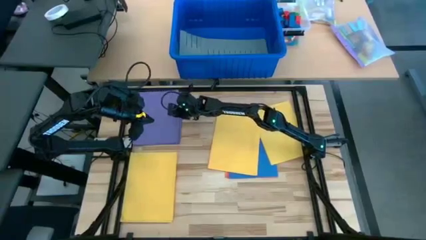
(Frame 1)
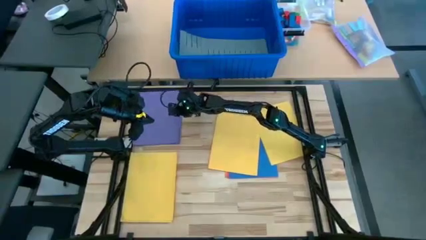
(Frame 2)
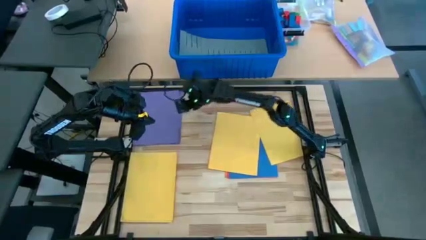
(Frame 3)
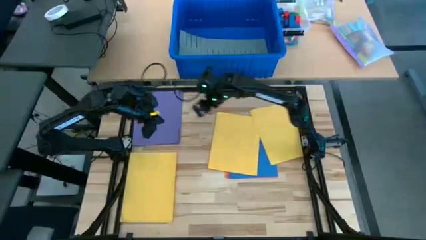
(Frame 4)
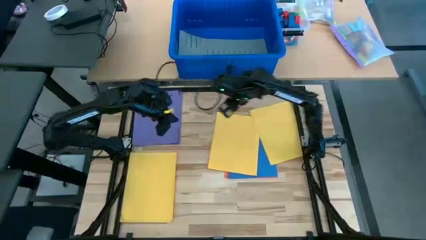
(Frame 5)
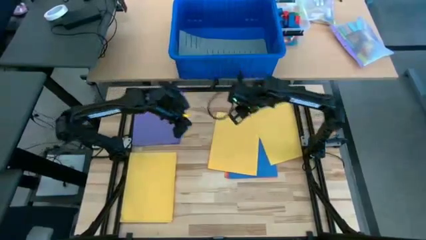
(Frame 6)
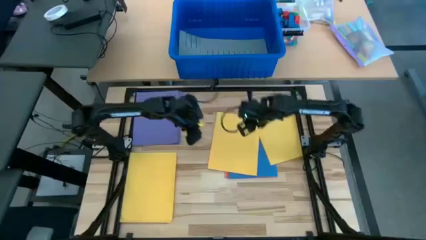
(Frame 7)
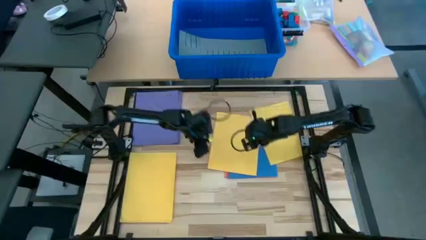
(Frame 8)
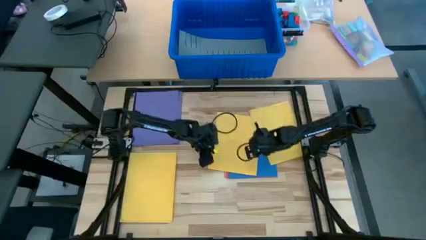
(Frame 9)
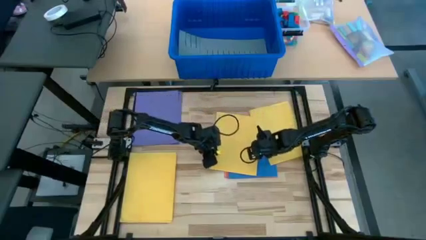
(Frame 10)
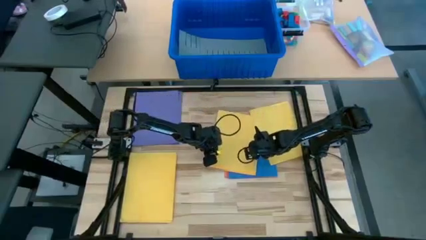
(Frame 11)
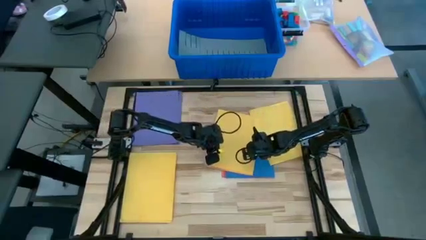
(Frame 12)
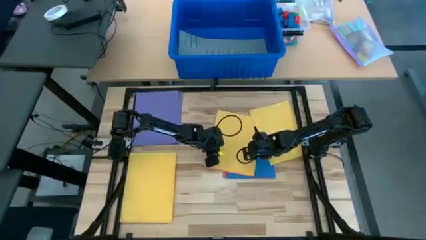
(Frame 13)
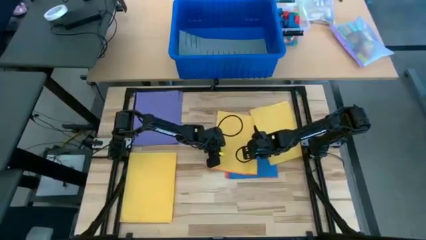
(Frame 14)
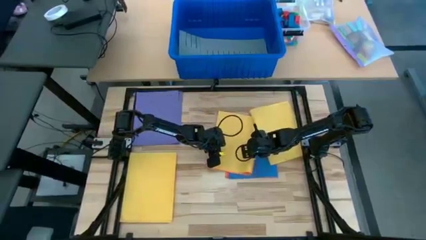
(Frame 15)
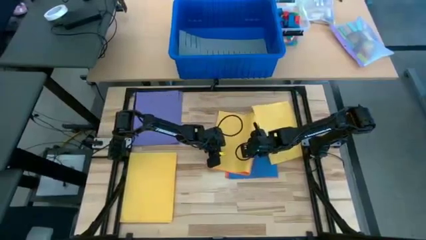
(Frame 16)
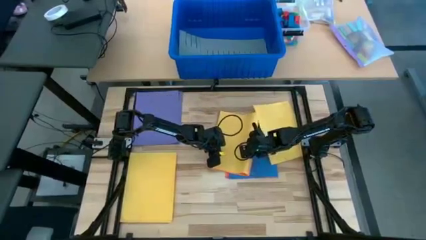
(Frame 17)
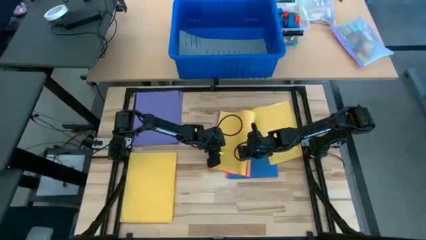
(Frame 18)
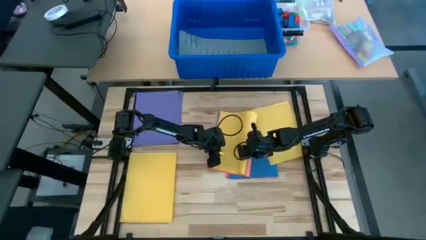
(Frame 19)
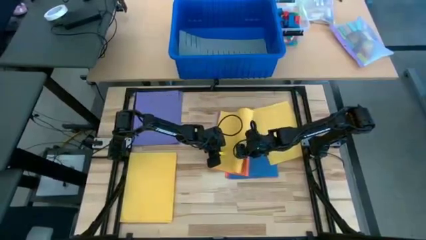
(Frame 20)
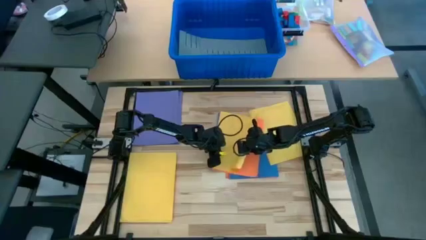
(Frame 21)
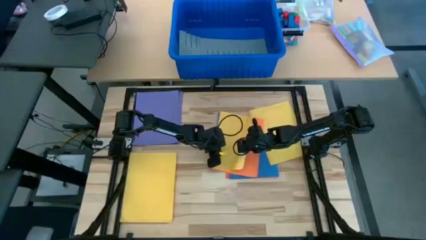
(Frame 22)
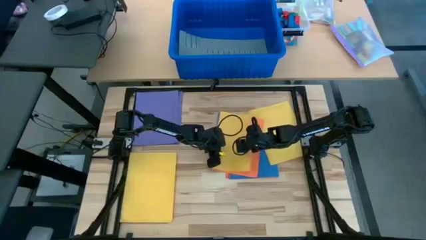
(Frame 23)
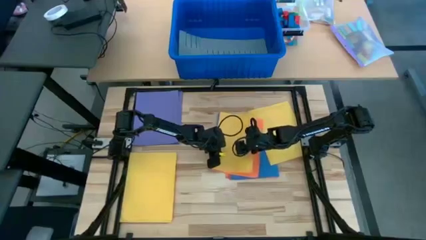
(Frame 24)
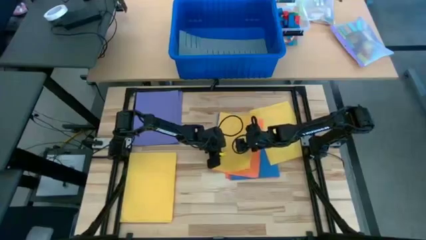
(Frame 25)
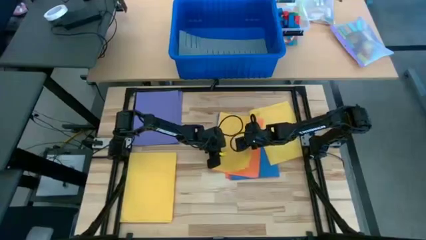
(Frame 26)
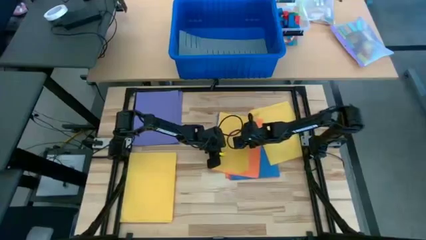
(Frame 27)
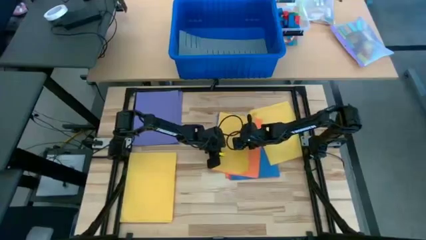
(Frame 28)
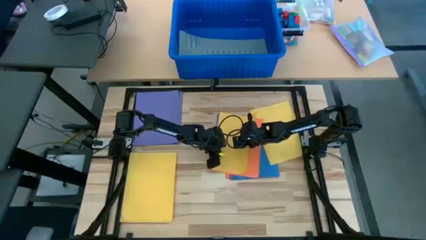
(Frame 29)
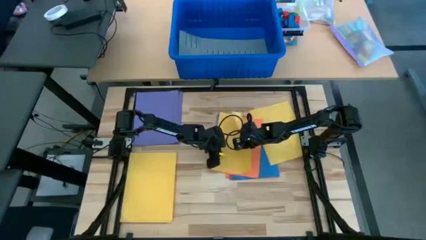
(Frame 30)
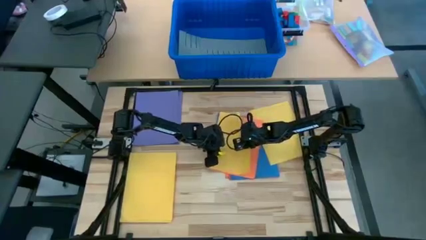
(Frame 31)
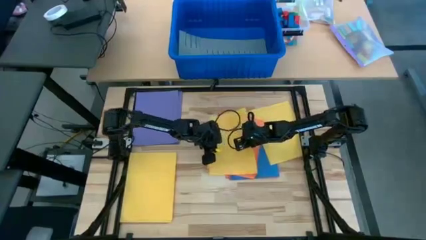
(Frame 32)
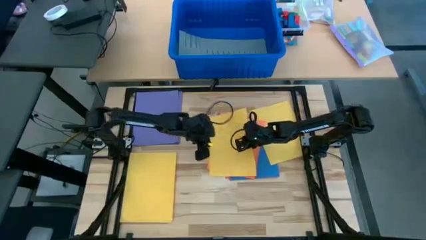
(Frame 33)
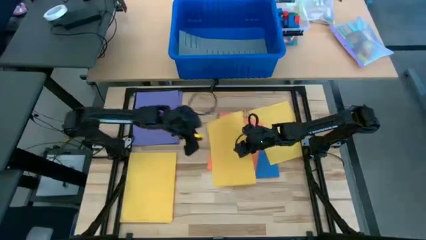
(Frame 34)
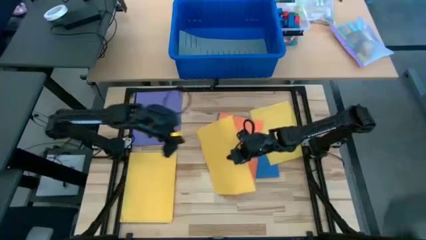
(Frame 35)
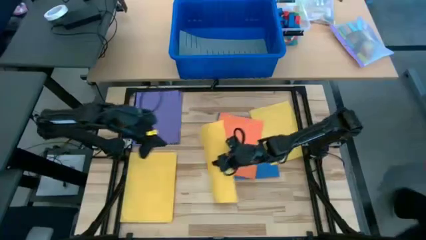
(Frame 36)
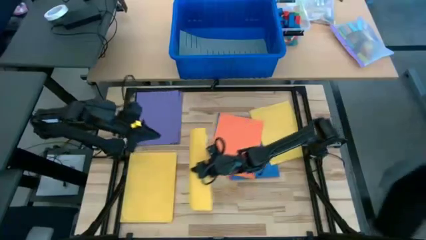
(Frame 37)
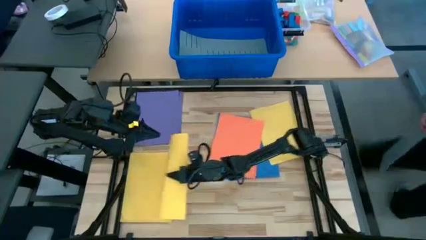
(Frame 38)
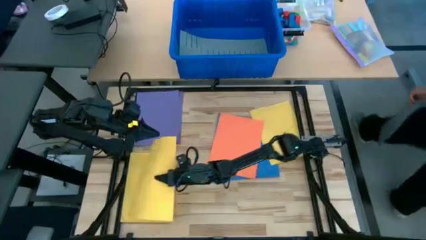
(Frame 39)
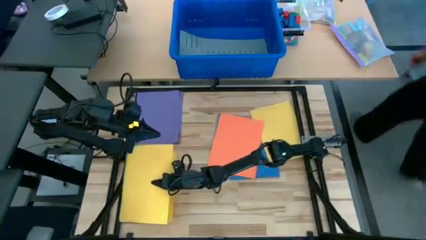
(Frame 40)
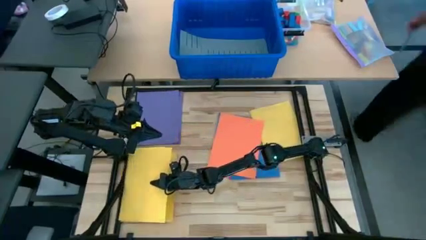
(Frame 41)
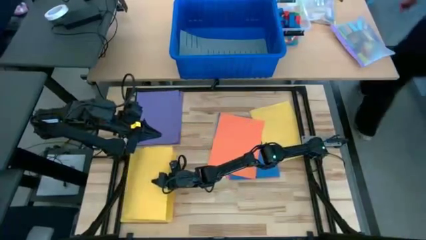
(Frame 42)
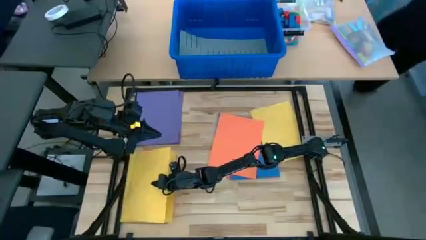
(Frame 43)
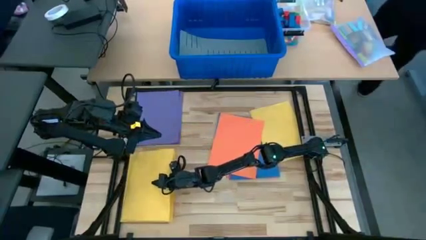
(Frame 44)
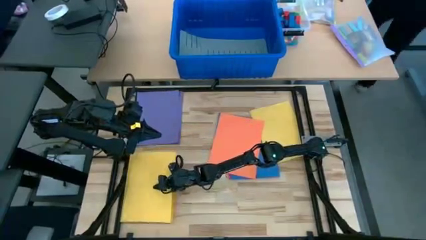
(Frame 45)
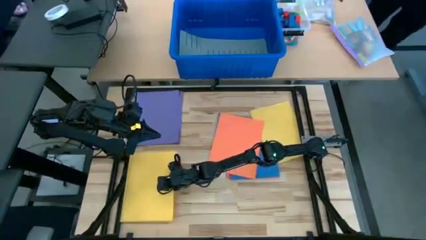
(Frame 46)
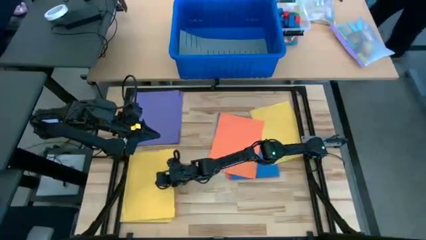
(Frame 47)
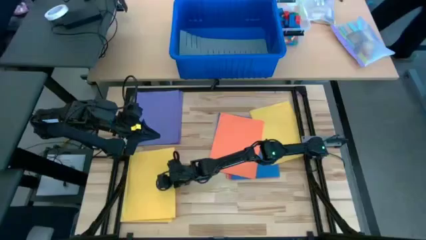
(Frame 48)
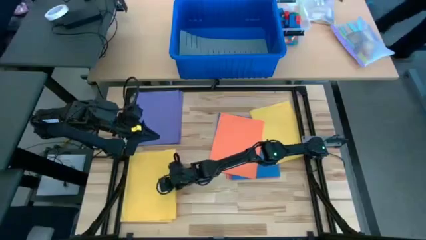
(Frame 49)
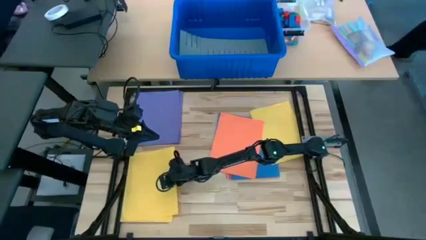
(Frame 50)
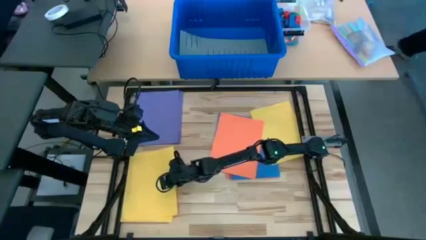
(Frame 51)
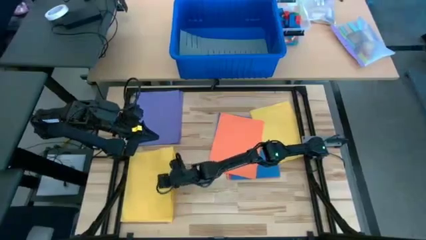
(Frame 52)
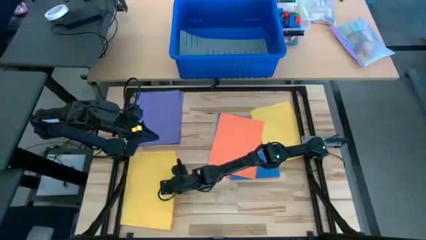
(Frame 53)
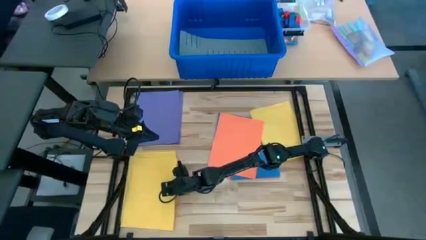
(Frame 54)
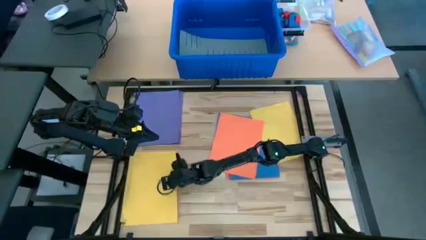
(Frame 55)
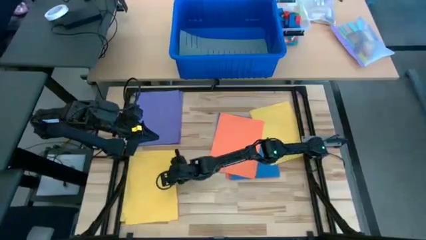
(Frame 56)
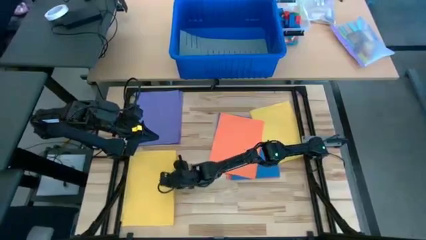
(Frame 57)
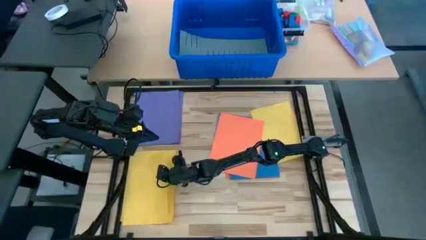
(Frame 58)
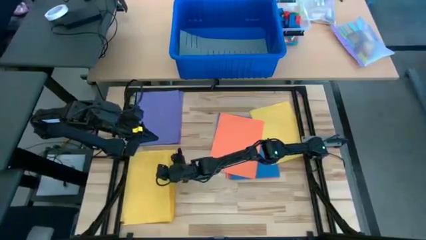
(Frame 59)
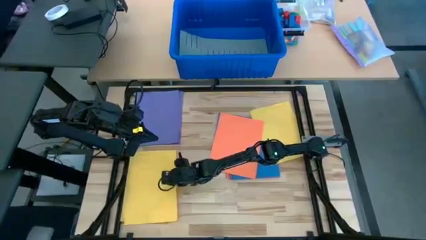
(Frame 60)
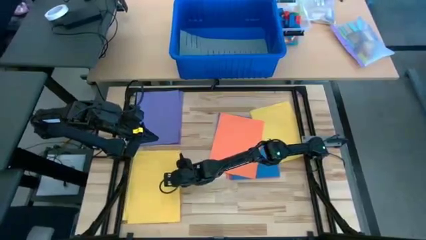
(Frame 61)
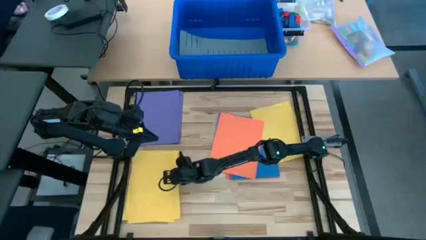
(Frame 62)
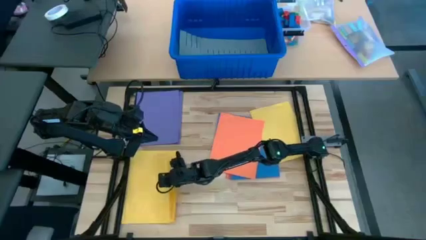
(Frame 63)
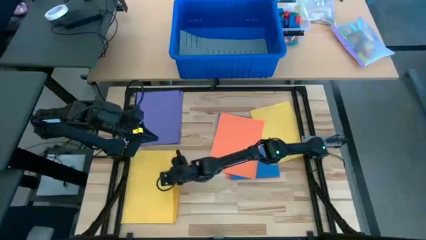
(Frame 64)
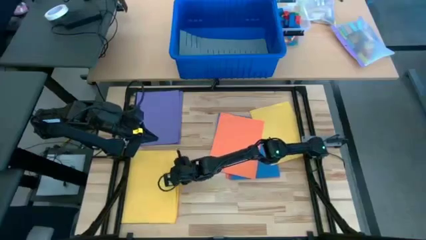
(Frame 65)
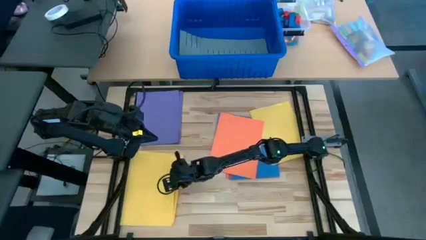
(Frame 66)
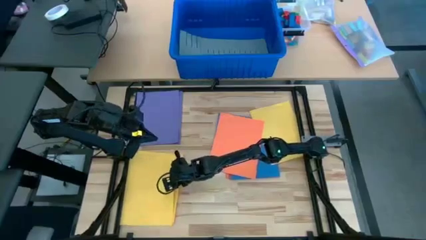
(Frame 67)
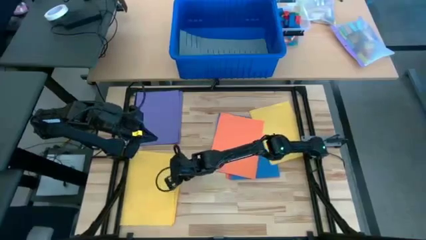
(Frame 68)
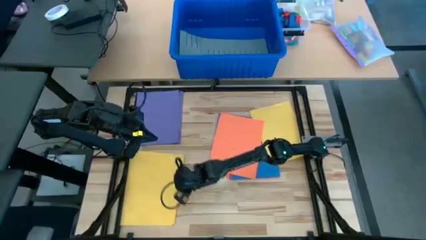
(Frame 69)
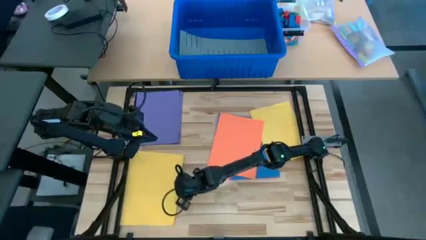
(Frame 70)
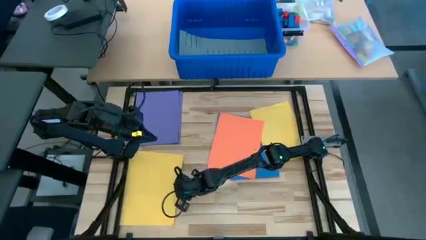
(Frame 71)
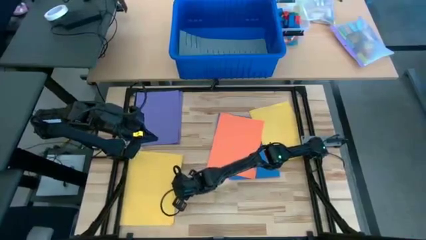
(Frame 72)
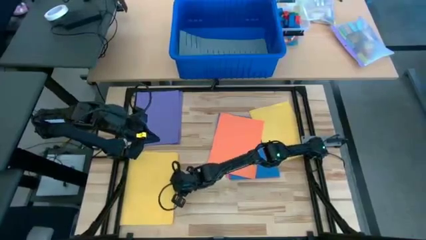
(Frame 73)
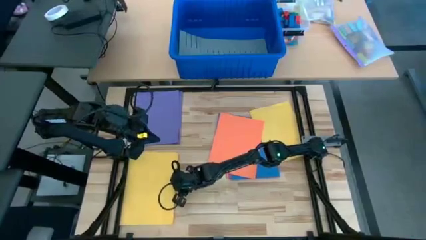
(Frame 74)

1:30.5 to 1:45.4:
Task: Organize paper
Stack the yellow colored paper on top of the other yellow colored papers

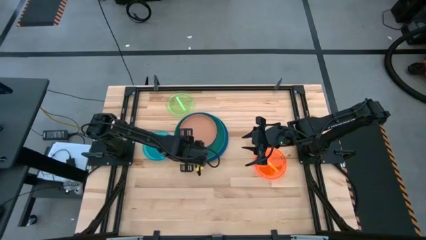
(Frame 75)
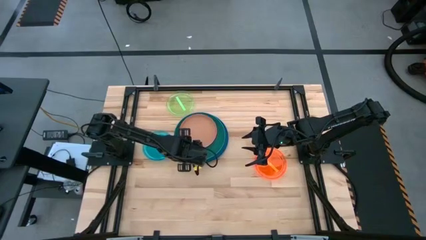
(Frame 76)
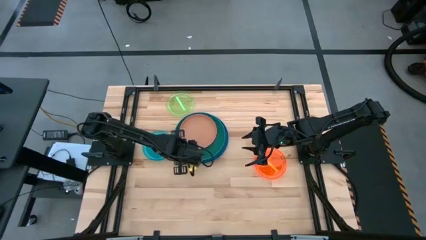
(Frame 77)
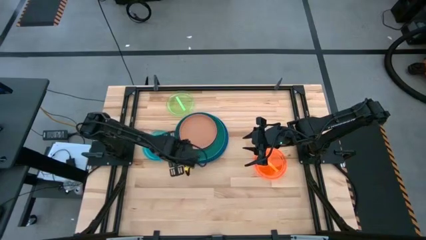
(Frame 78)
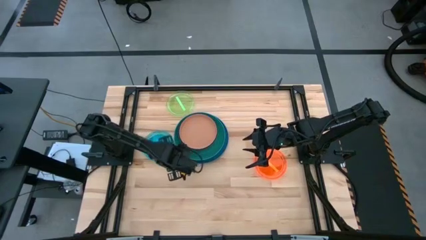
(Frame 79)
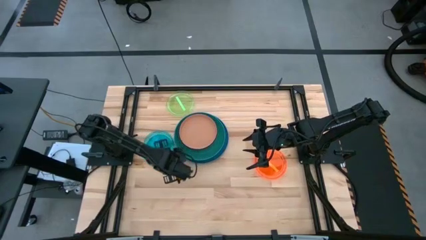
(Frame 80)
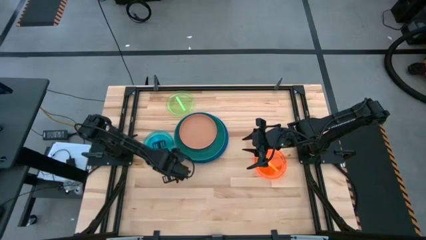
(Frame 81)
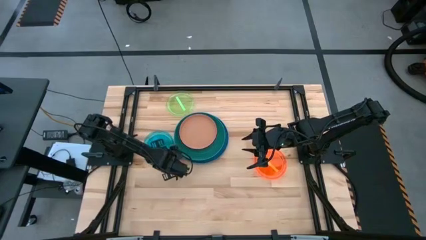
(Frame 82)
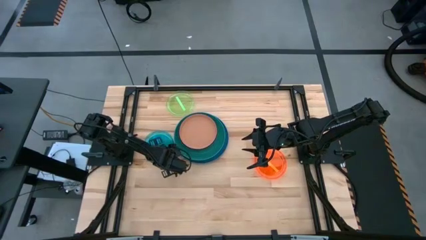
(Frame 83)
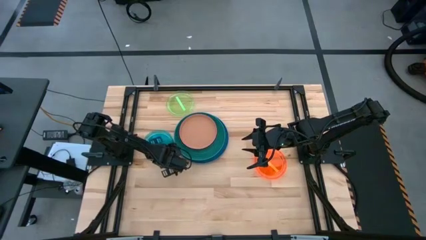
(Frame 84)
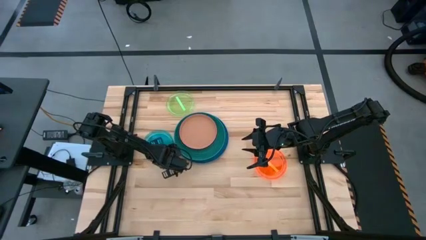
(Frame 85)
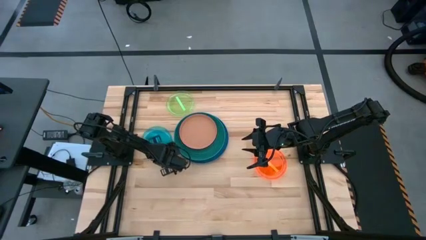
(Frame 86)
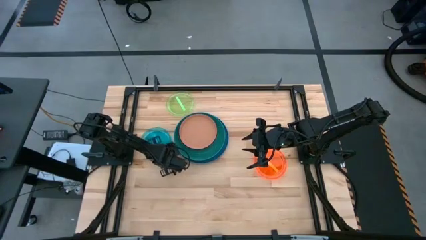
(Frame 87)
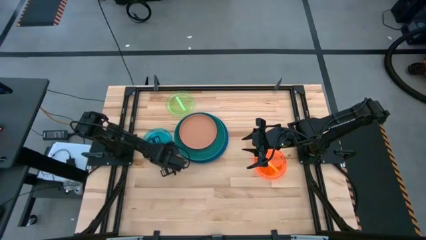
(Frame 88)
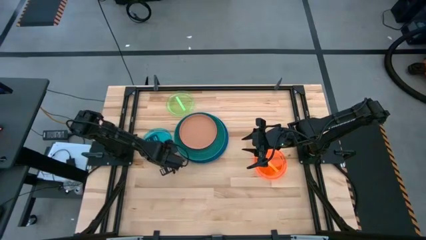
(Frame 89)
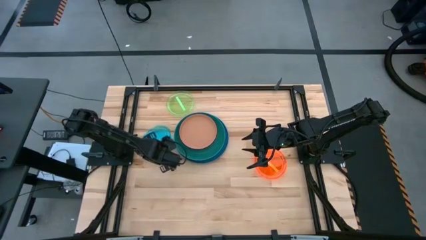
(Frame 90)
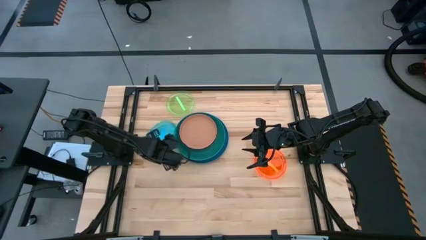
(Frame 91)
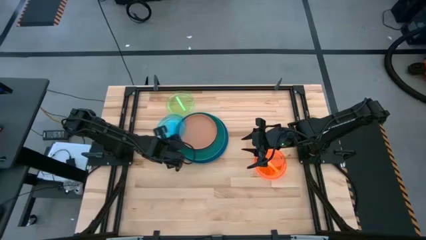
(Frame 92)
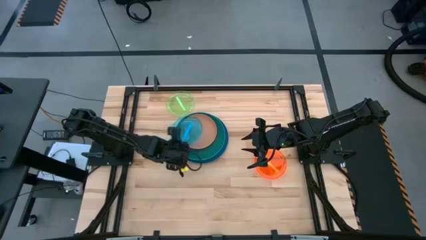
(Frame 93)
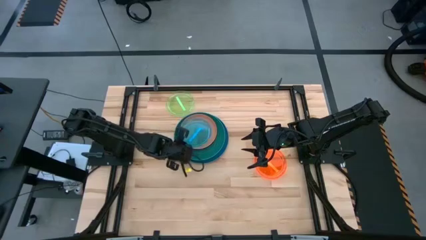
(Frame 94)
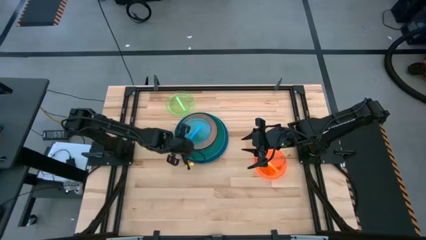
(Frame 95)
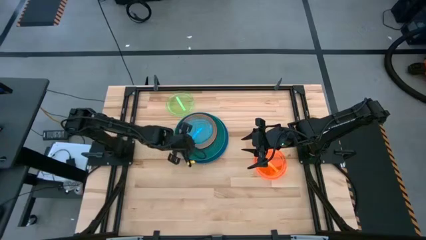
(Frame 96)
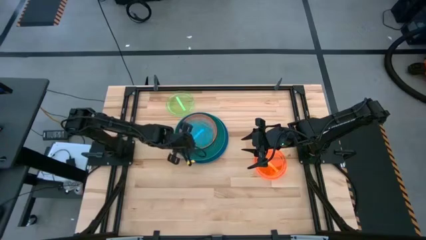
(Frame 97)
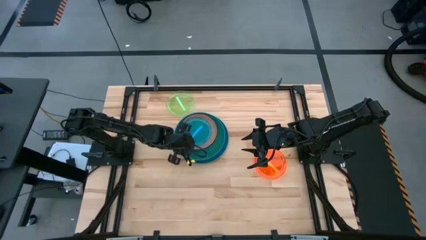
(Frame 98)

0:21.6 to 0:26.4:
Task: Stack plastic plates
Stack the transparent light blue plate on top of the pink plate
